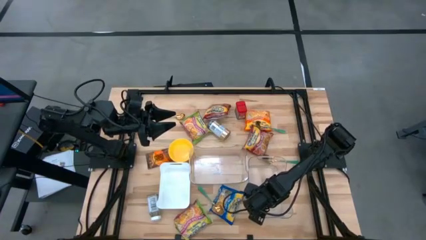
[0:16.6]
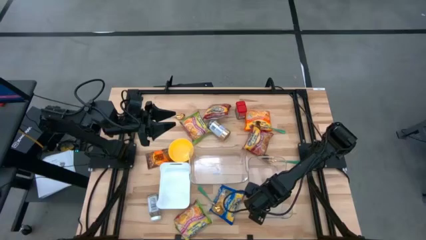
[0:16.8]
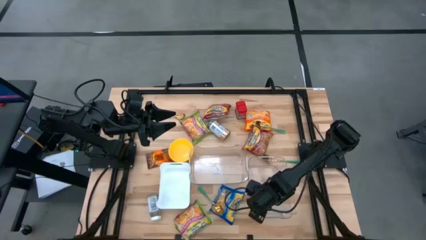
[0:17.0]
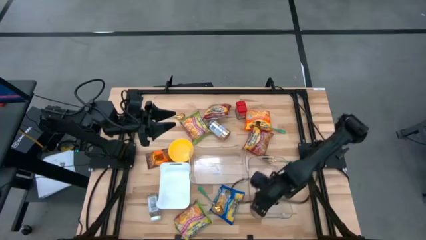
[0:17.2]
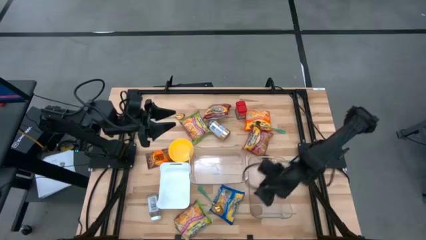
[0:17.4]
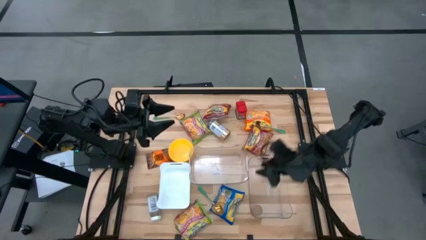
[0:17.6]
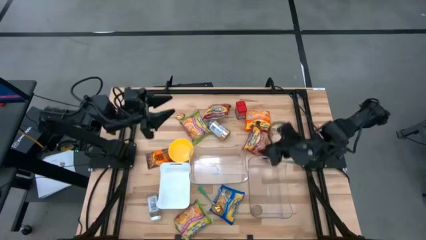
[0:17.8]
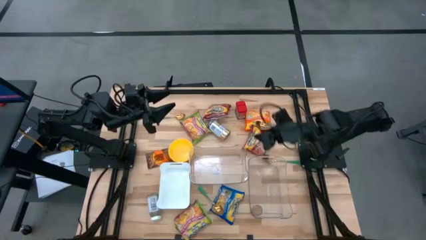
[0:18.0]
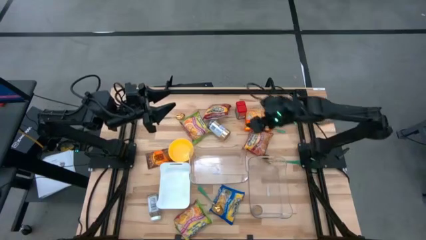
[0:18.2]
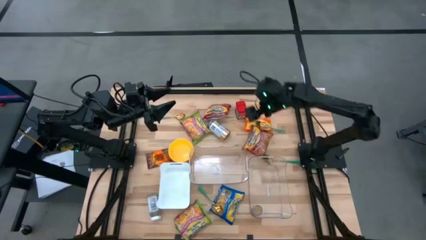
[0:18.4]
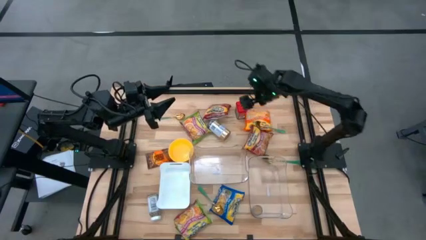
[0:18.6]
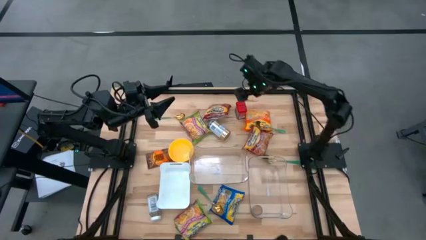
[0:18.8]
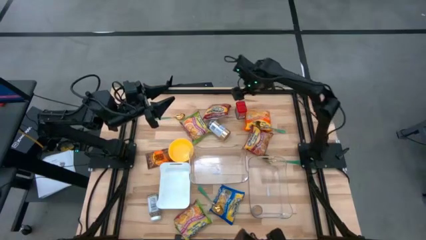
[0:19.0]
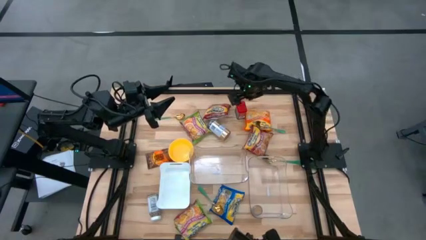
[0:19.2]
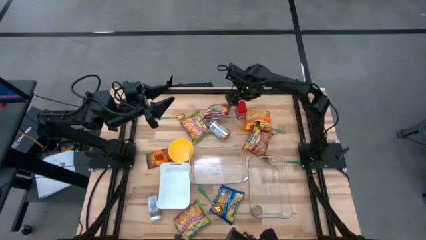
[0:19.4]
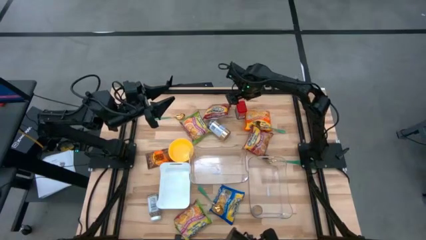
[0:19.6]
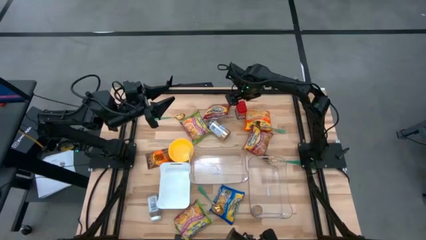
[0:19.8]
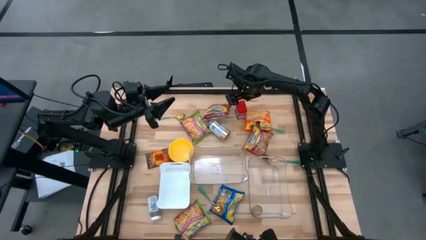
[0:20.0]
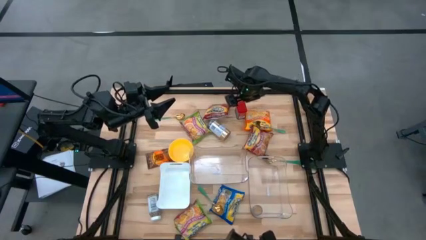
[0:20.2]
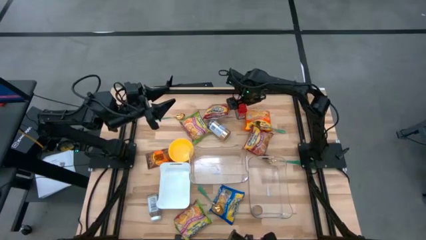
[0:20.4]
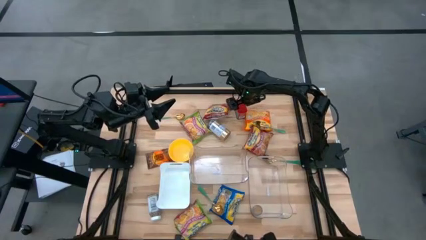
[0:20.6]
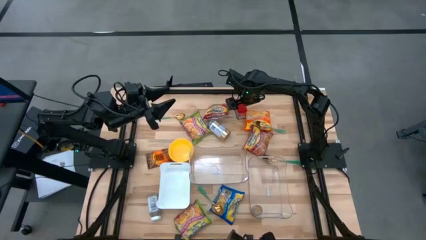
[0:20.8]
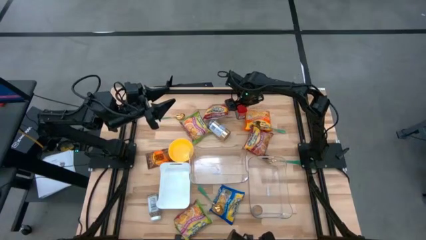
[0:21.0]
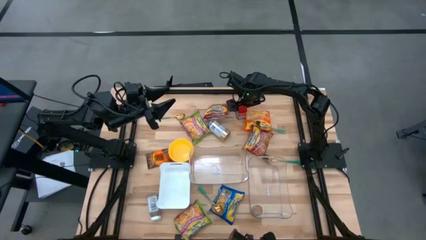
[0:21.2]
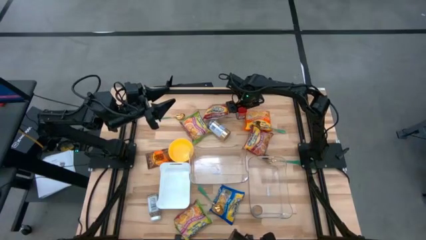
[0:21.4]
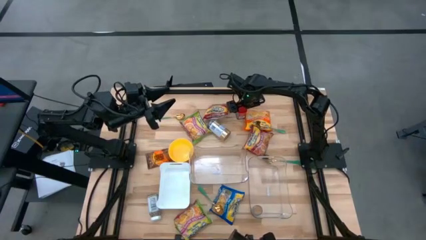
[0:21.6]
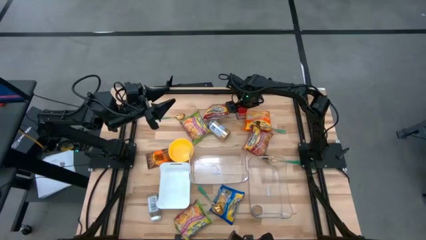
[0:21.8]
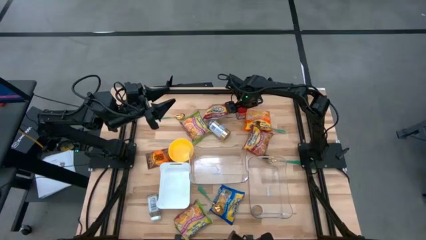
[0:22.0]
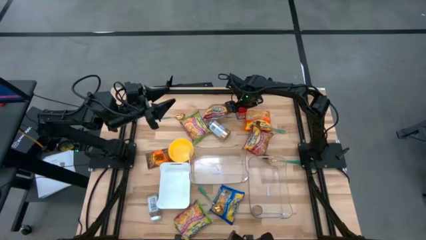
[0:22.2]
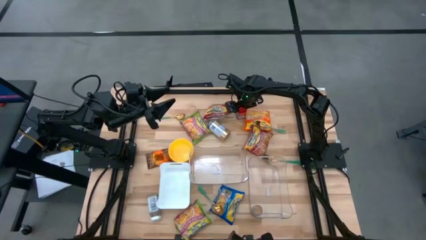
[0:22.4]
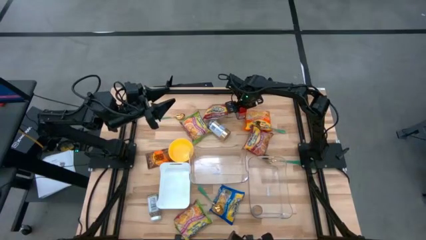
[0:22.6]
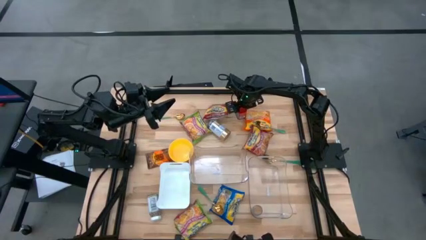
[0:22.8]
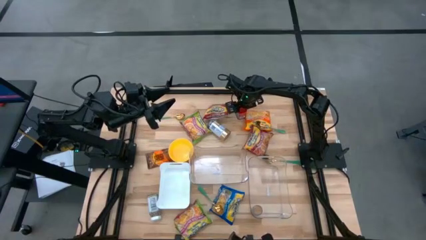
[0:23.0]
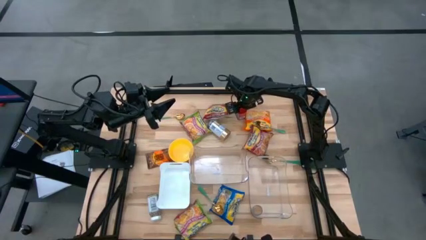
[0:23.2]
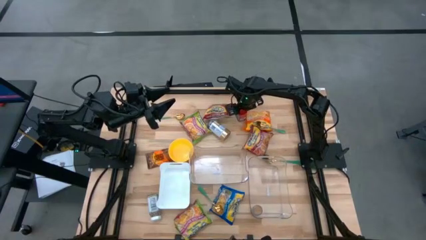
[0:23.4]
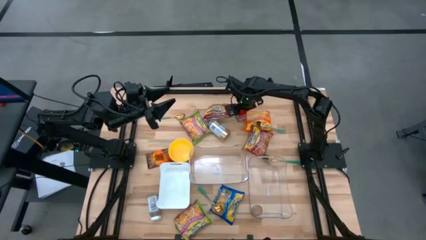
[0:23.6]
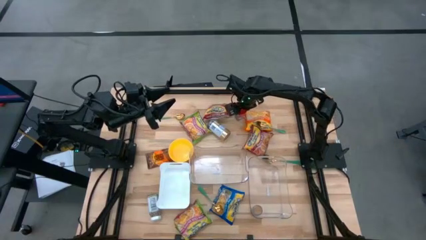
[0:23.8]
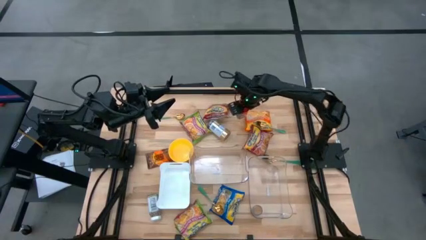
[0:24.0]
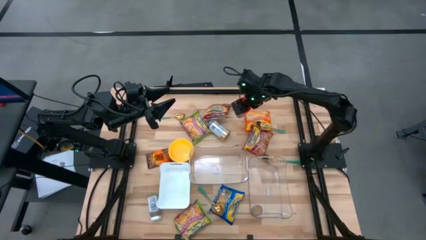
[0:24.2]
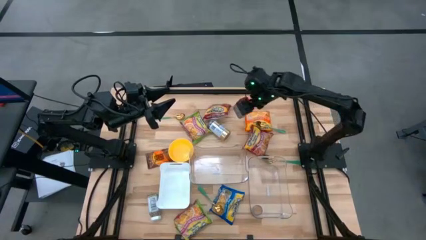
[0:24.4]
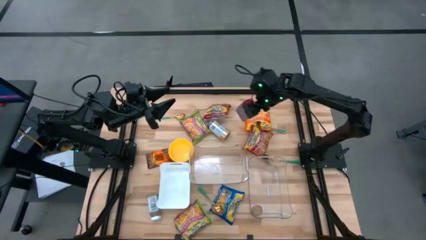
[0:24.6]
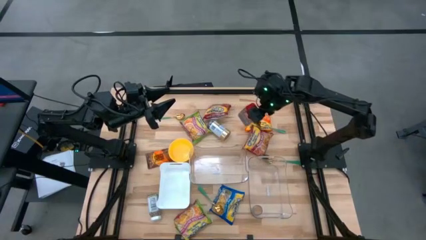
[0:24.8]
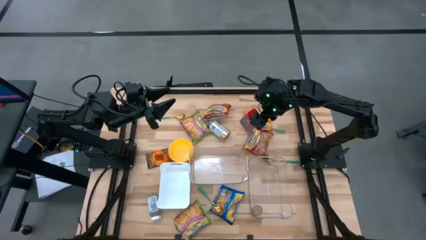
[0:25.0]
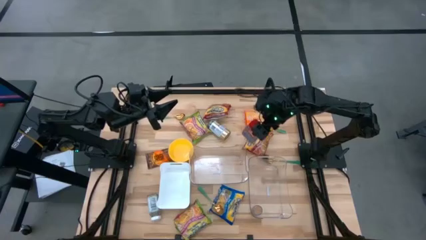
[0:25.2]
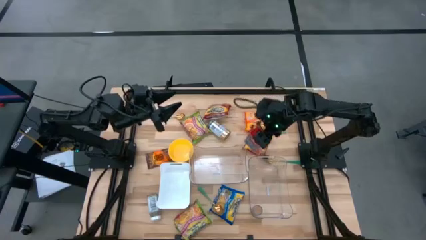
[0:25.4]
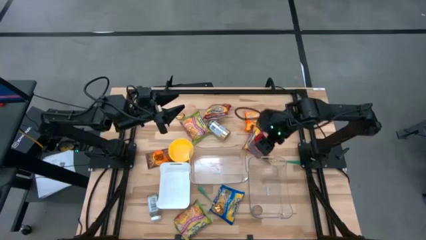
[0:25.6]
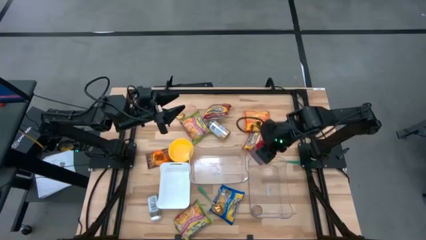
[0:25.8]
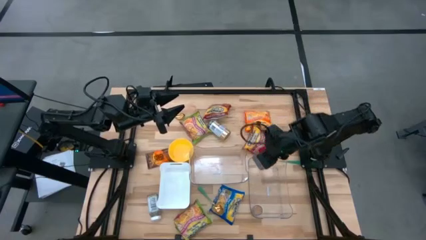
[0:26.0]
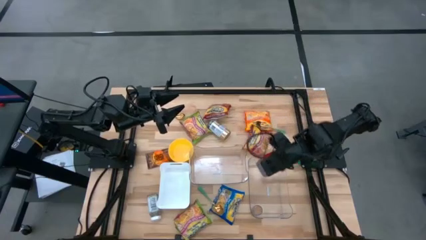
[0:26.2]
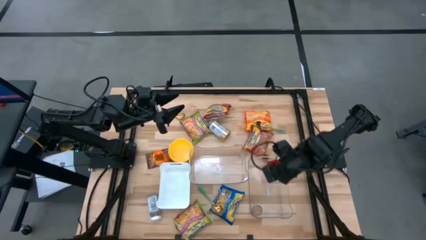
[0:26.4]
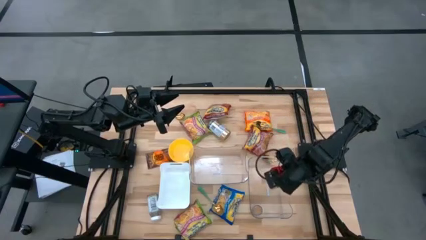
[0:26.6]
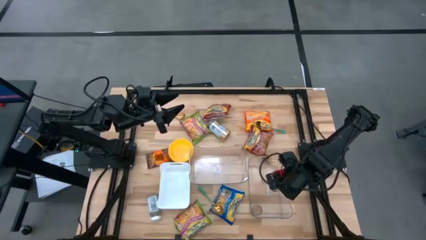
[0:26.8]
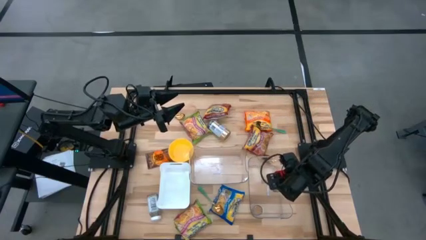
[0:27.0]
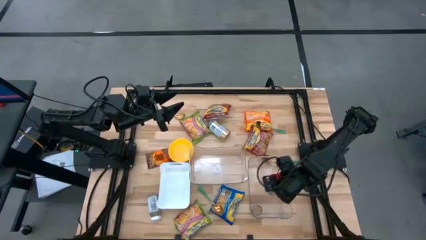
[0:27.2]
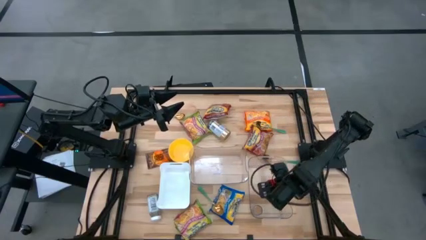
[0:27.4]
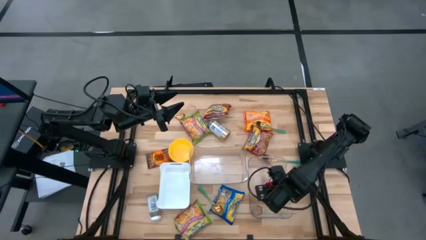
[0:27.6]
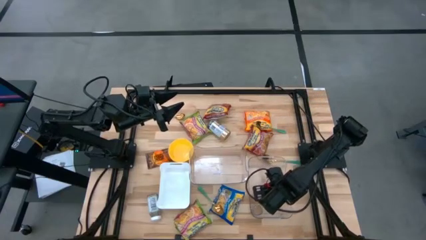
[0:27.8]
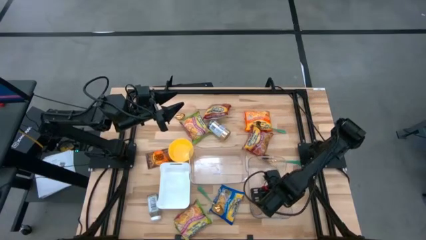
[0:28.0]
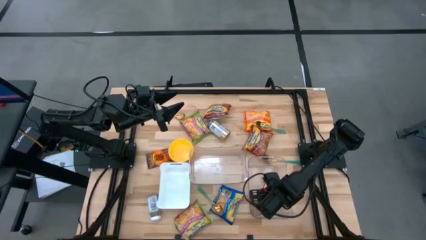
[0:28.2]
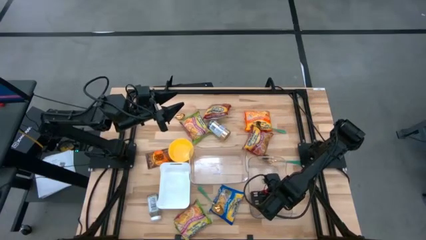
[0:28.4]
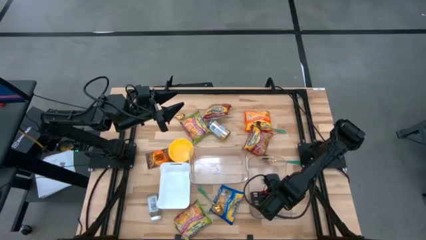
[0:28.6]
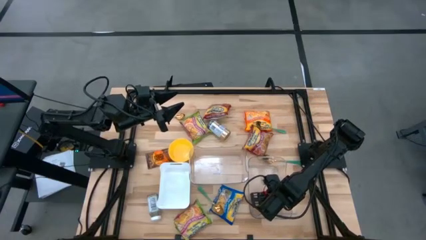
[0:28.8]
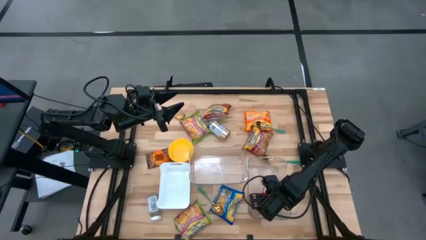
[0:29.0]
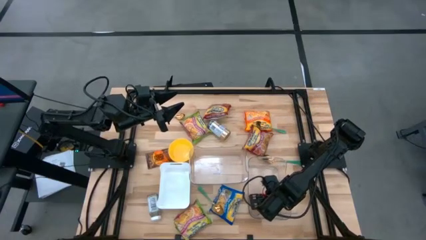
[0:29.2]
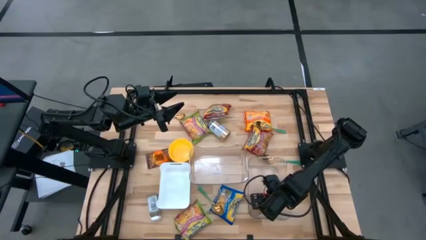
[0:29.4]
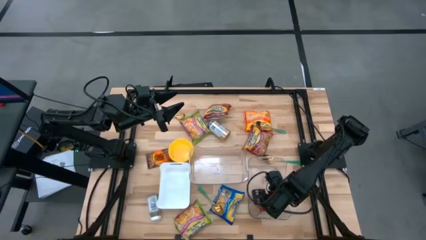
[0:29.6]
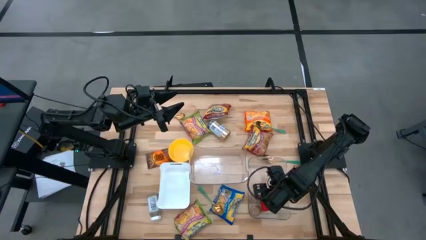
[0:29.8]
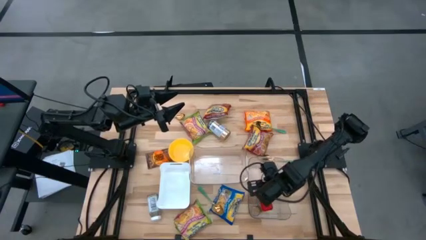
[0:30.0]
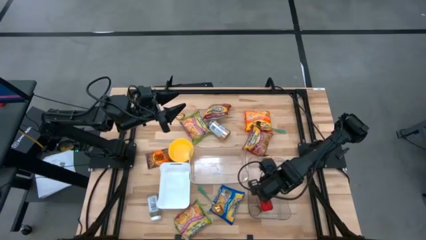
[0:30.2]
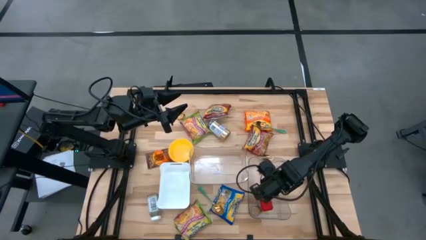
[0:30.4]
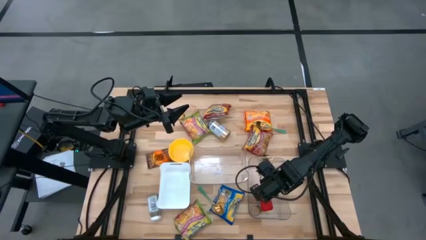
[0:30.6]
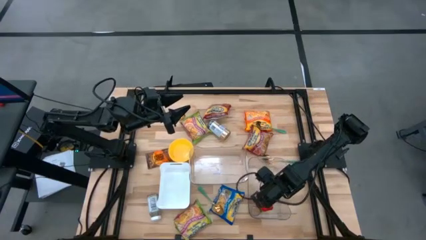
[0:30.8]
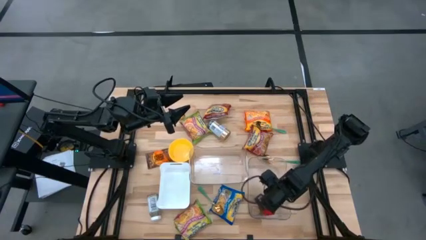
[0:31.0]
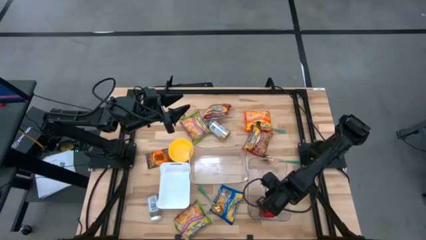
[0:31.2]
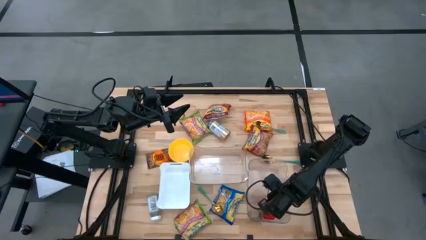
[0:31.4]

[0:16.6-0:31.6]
Task: Pick & Place Food Item
Put the red seasoning can into the right transparent bin

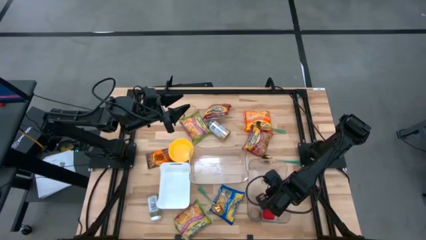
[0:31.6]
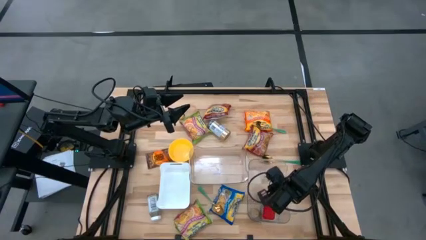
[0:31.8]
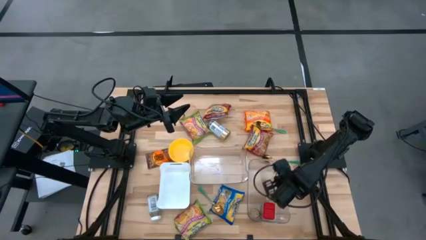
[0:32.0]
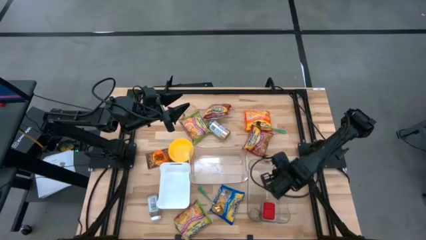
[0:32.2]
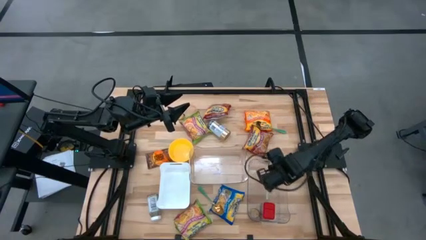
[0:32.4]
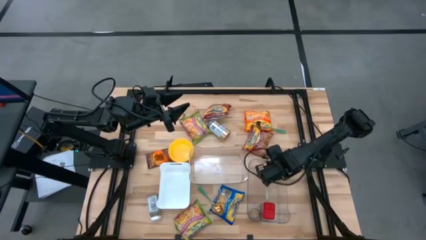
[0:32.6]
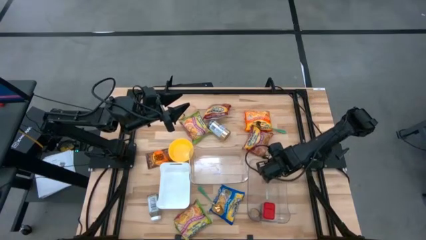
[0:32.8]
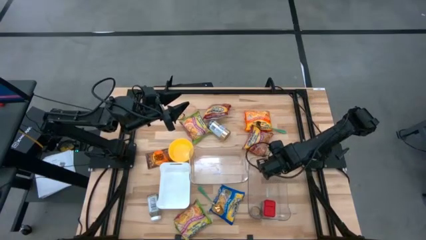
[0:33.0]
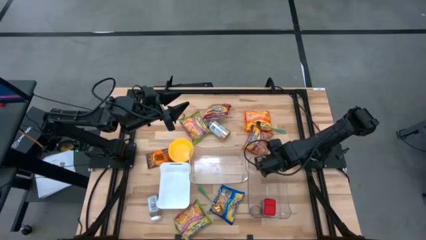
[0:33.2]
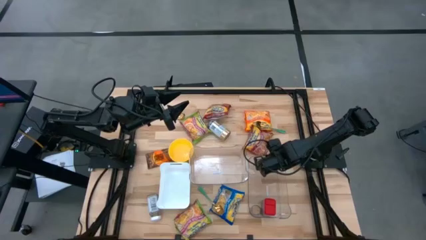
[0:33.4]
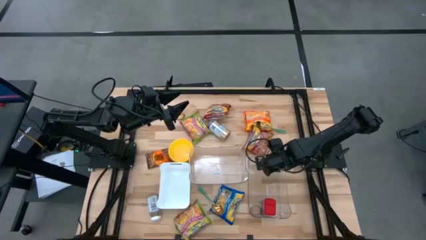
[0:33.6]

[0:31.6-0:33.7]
Adjust the right transparent bin
